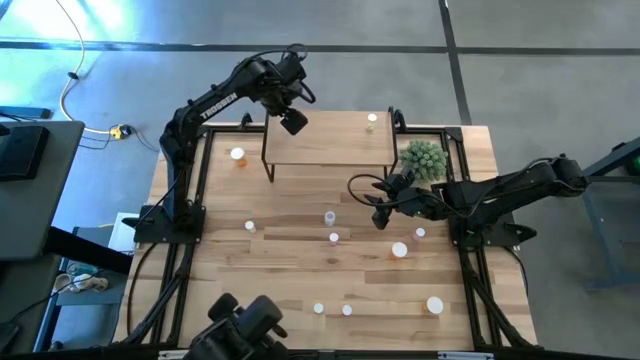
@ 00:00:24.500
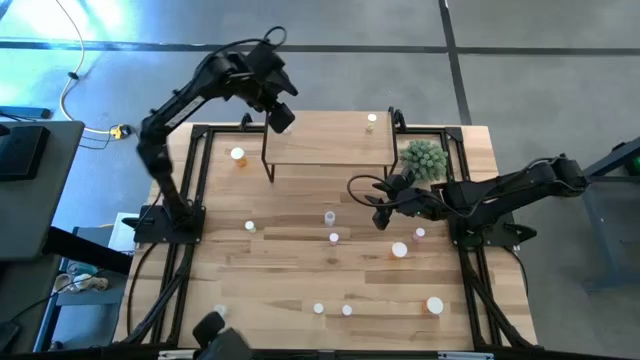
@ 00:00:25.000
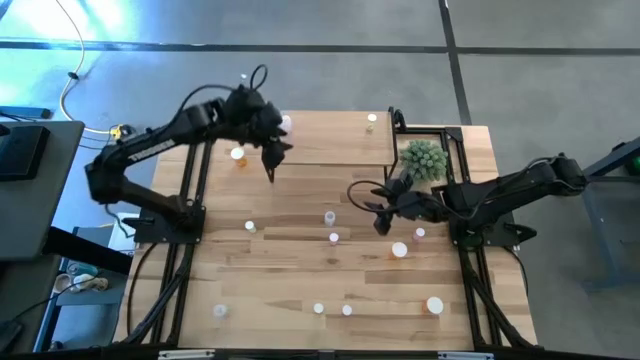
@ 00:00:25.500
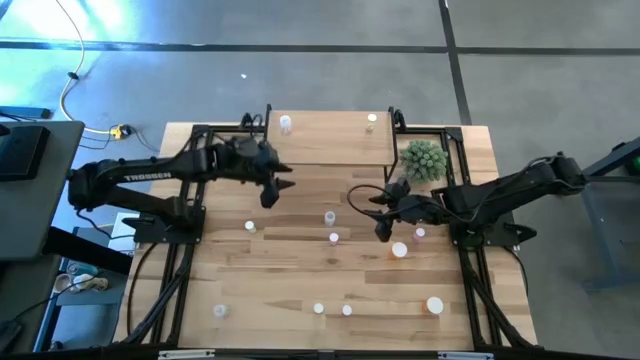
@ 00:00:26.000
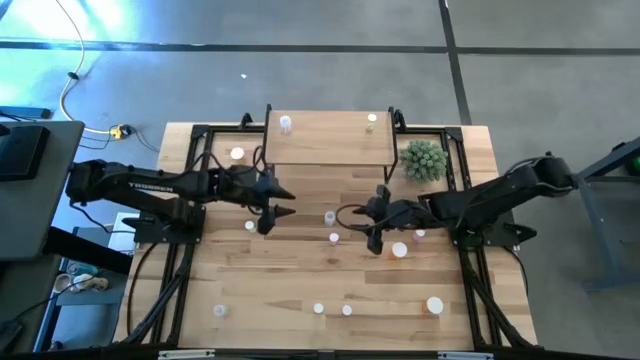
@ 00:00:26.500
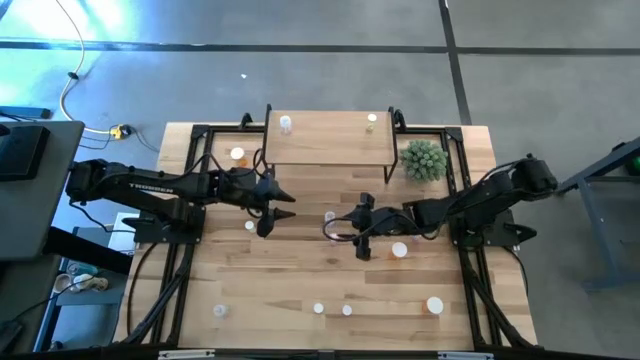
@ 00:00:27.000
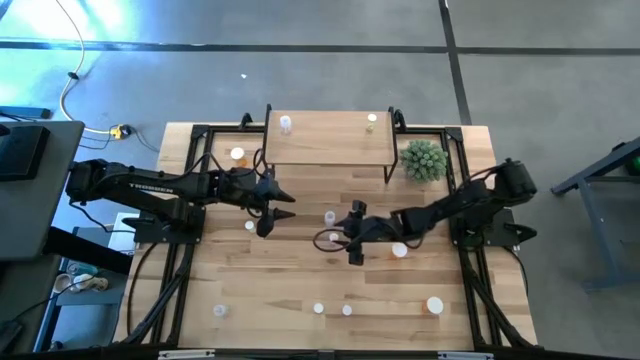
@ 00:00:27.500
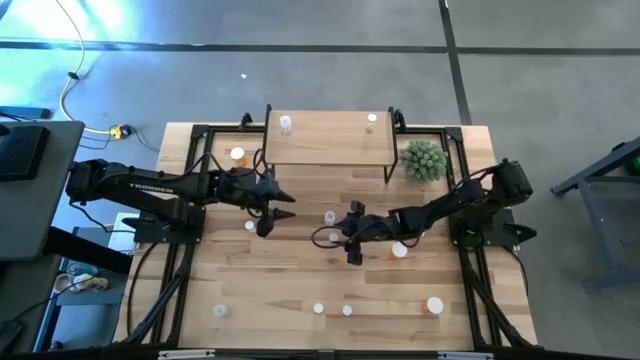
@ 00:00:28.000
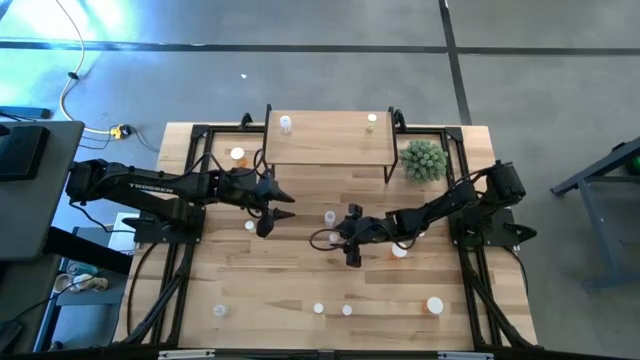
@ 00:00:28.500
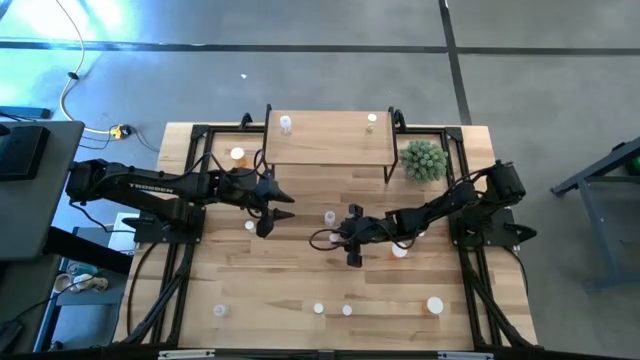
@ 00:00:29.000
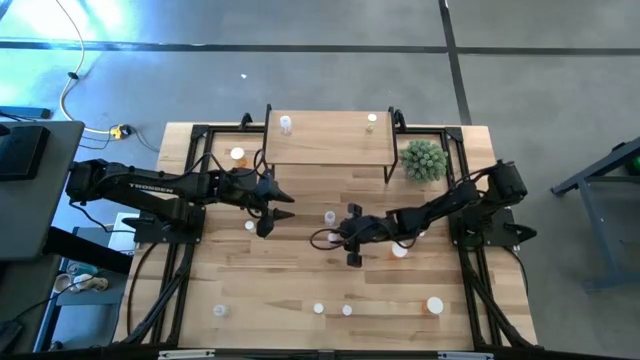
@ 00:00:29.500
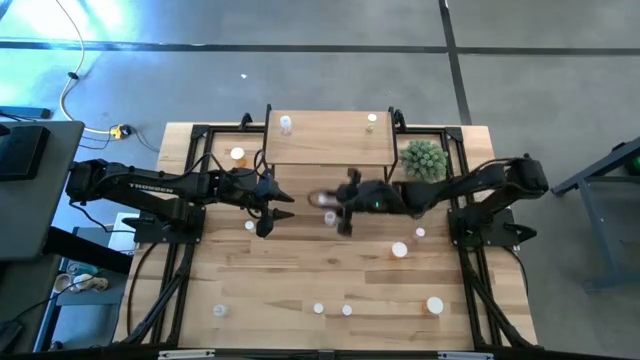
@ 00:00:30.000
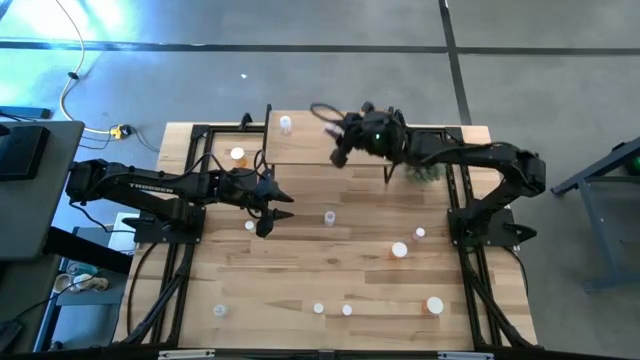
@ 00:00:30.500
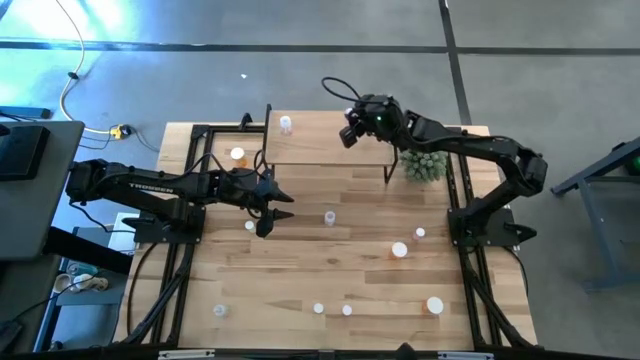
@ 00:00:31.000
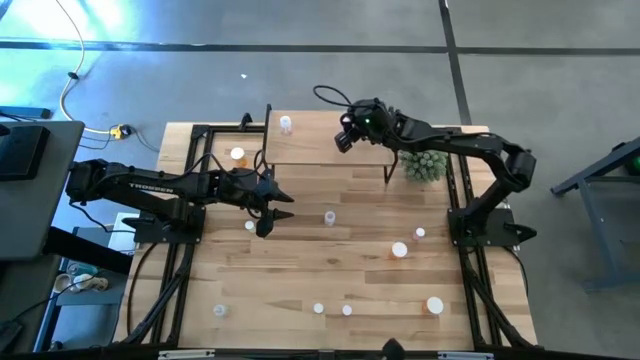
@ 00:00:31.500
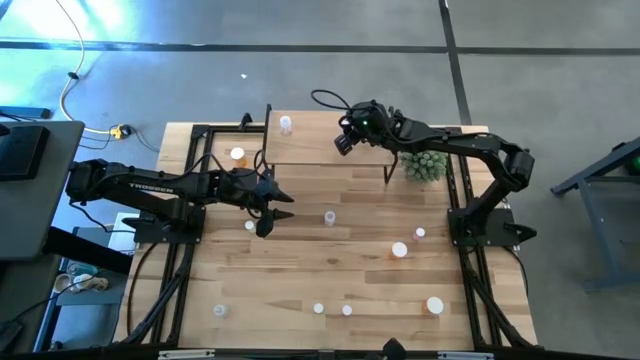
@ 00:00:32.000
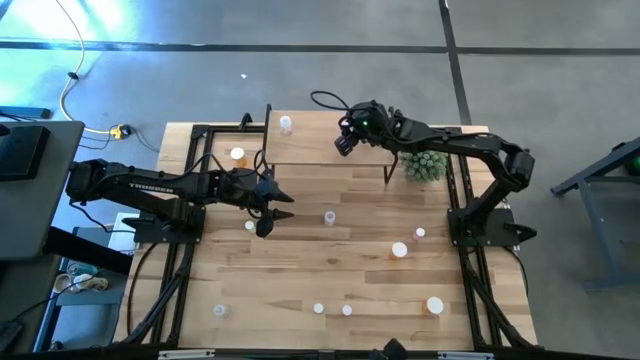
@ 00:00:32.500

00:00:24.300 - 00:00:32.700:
Task: Pick and place medicine bottles onto shelf by color
Put the top left pink pill bottle on the shelf

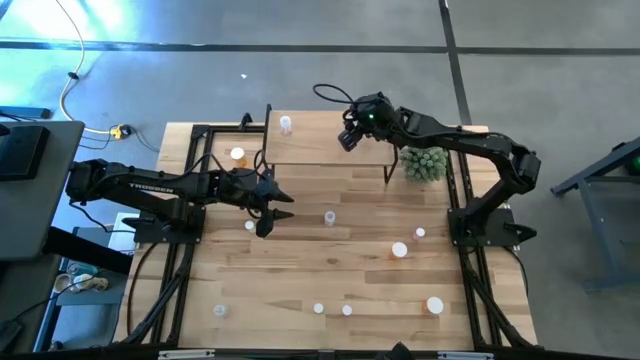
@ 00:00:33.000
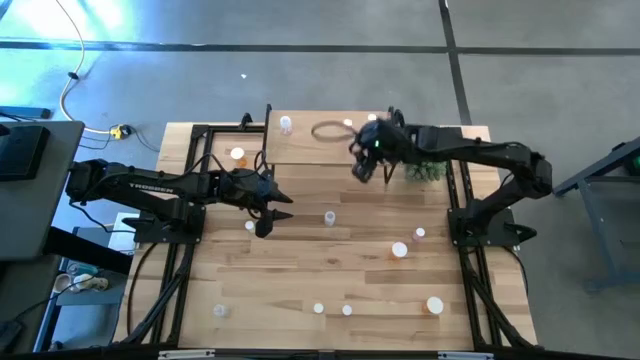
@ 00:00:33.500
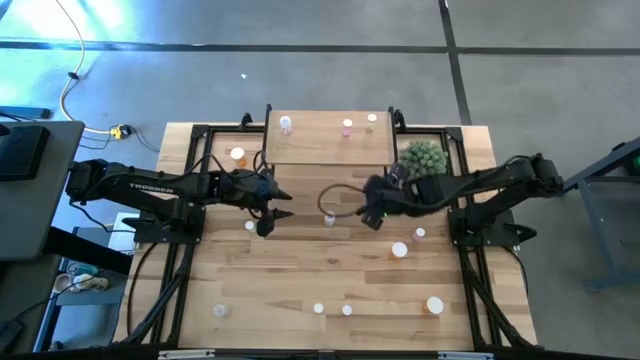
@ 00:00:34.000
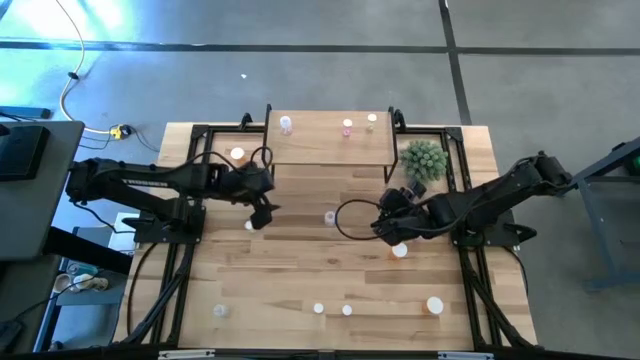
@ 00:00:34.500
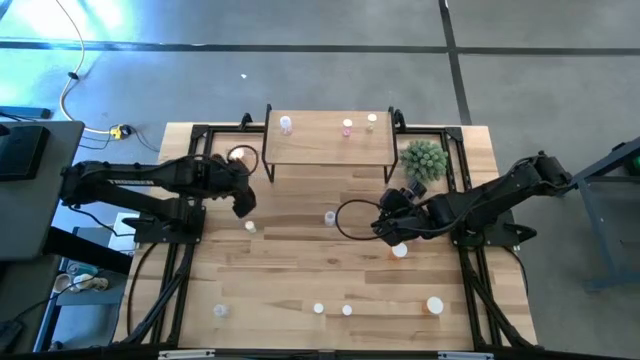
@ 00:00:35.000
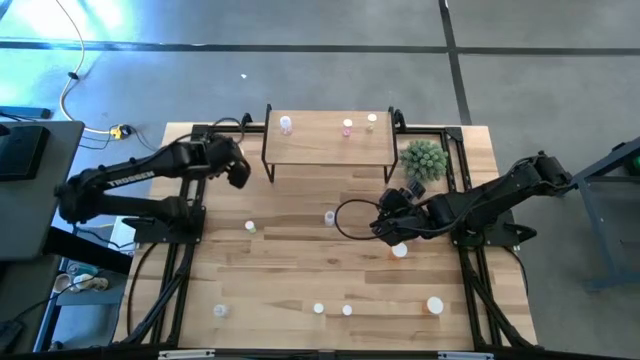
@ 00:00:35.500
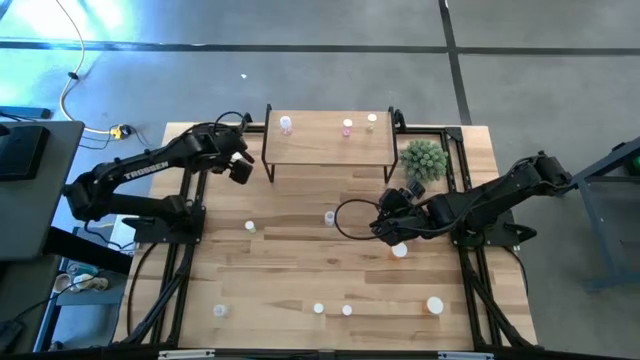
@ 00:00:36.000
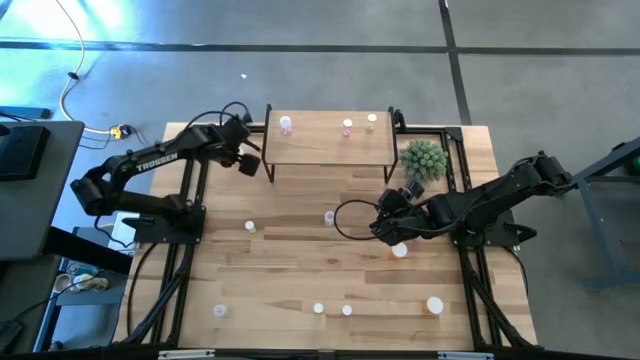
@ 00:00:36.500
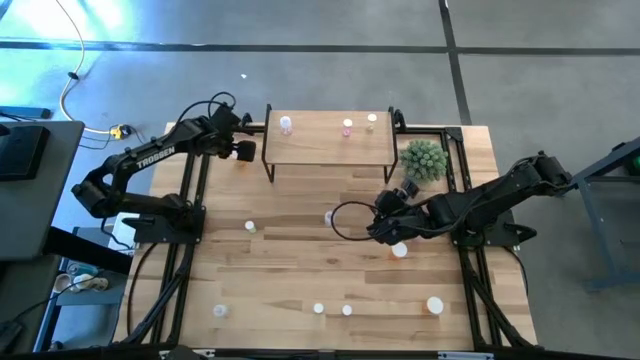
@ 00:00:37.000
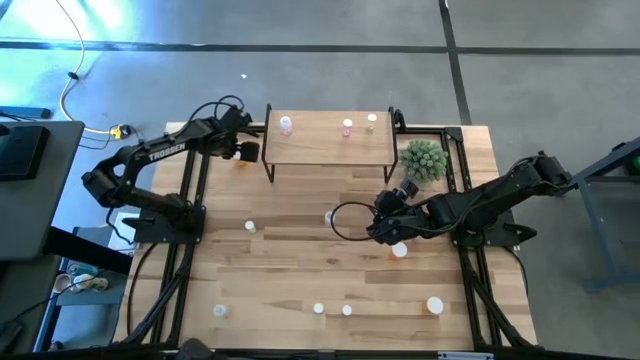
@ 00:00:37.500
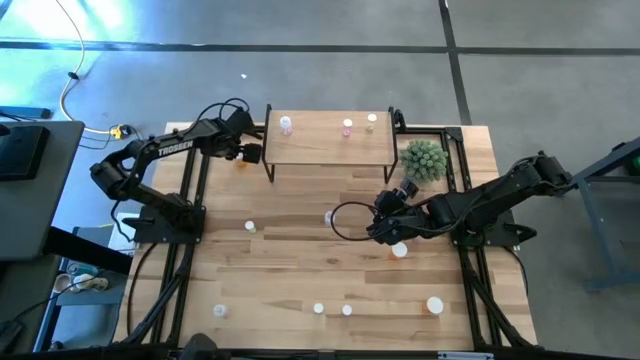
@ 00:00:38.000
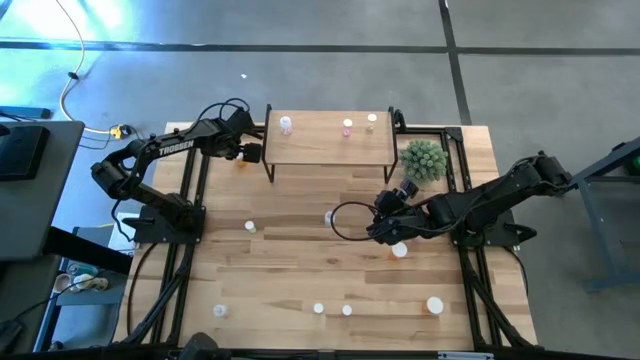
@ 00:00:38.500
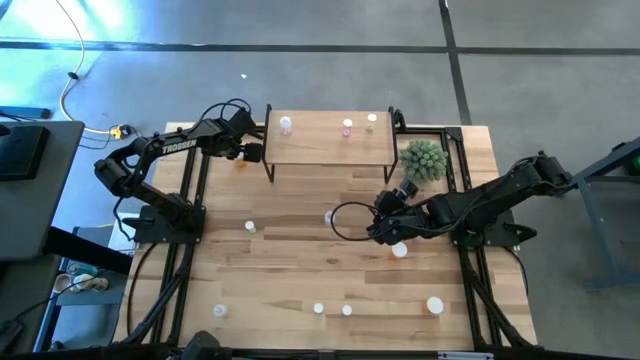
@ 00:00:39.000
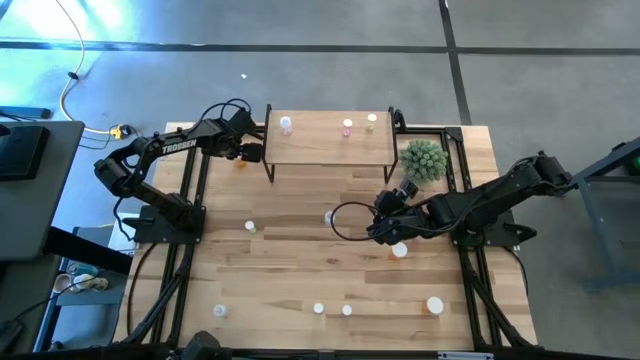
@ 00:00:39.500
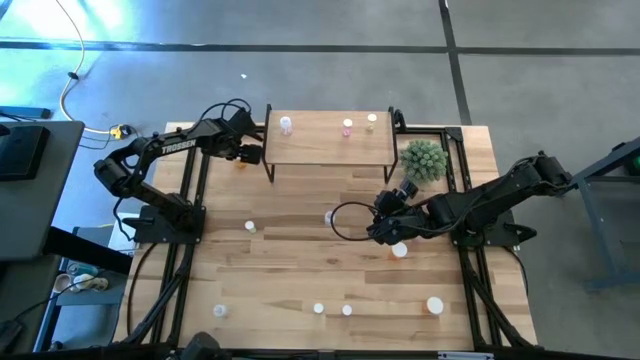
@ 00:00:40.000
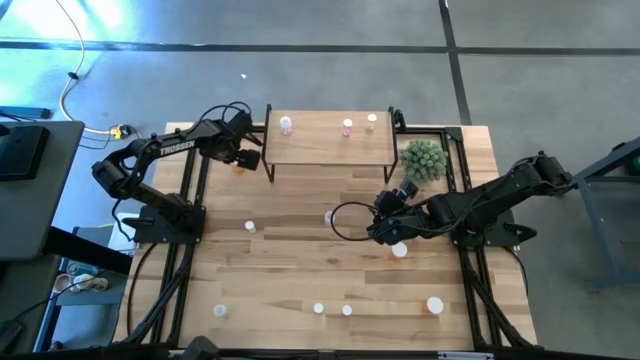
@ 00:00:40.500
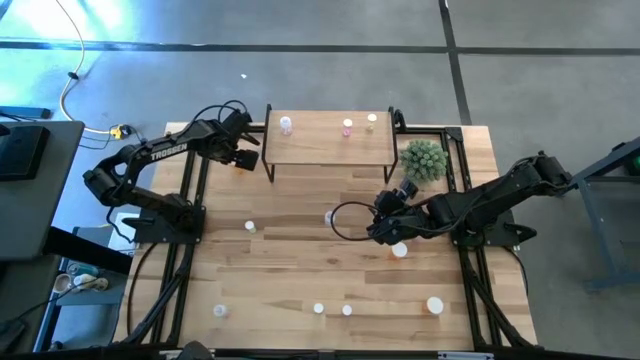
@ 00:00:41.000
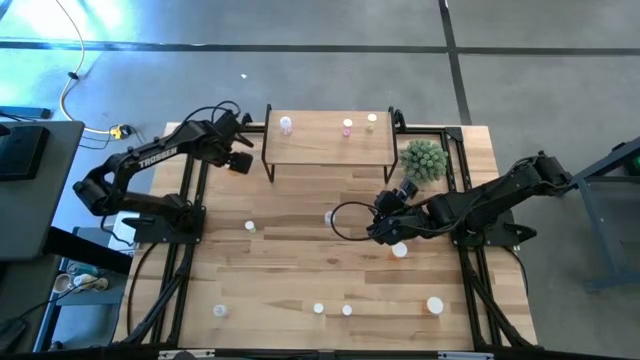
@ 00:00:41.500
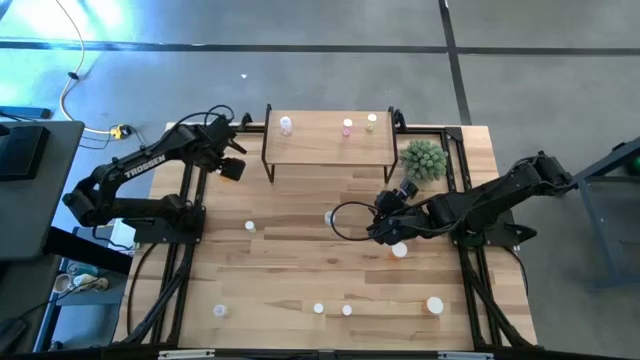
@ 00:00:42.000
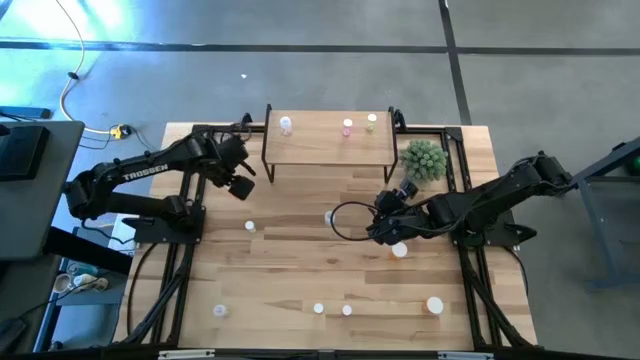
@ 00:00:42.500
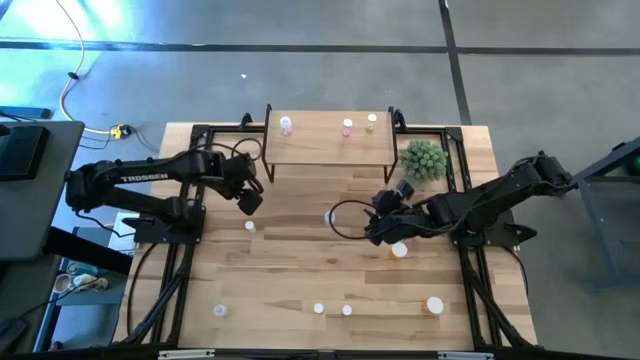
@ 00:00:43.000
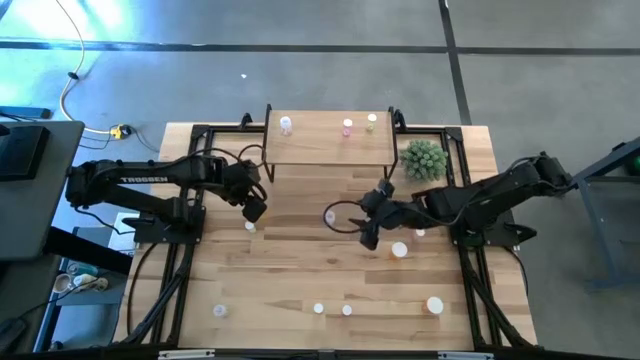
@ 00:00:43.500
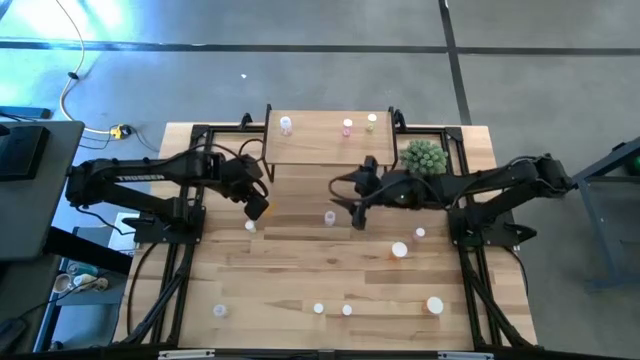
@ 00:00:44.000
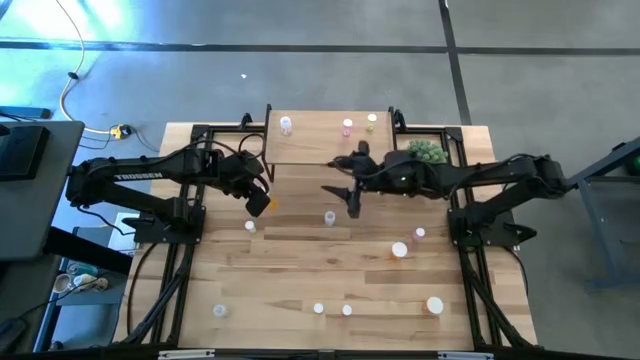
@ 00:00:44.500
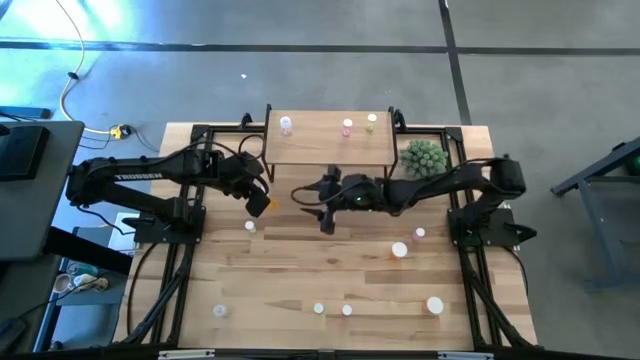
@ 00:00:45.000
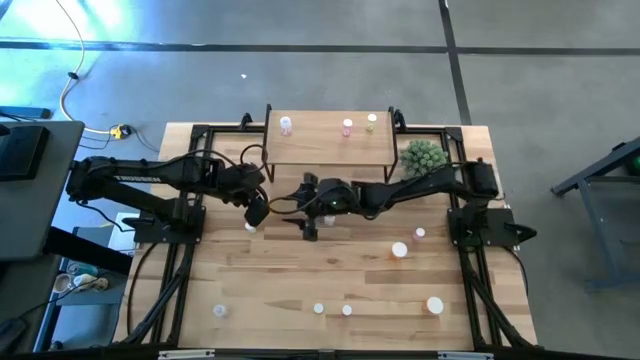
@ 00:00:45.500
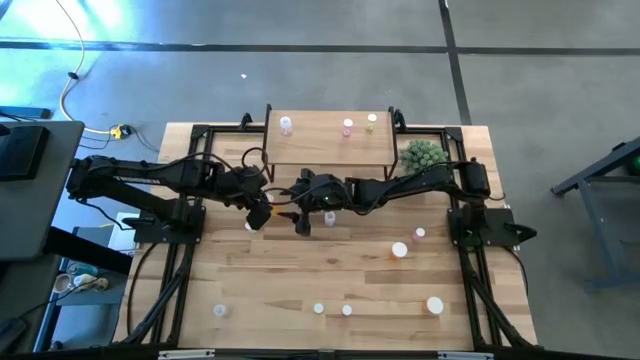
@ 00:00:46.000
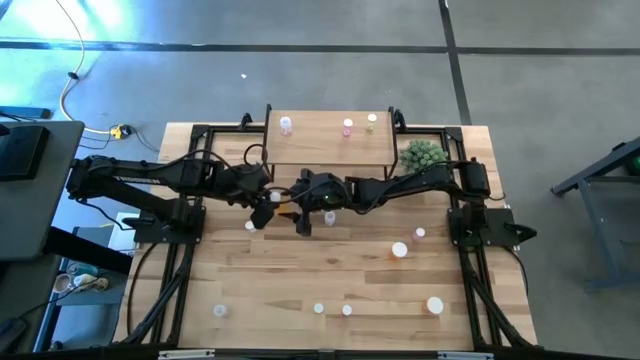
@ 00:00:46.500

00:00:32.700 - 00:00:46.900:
Put the top orange pill bottle on the shelf
